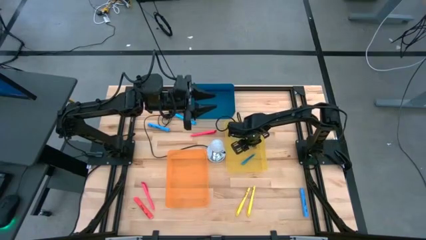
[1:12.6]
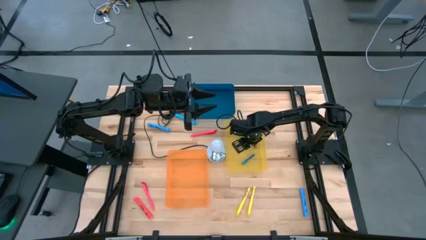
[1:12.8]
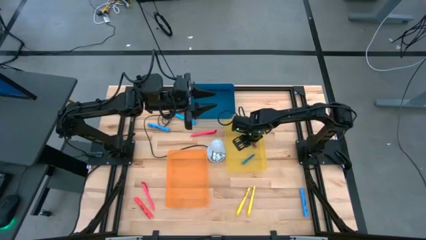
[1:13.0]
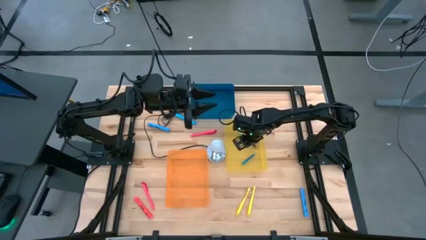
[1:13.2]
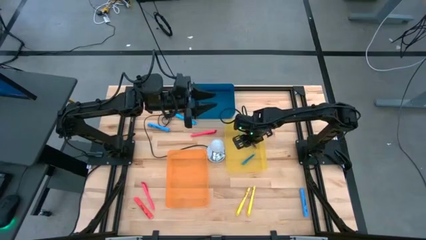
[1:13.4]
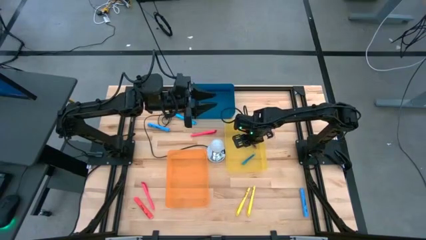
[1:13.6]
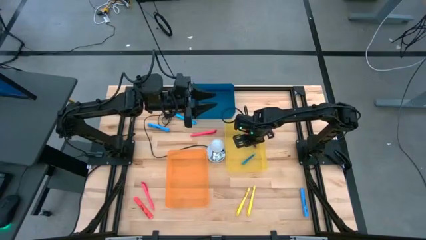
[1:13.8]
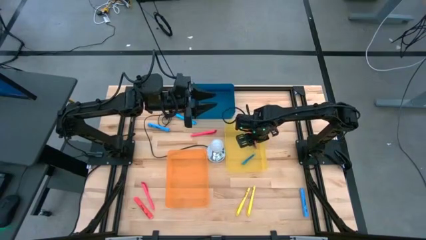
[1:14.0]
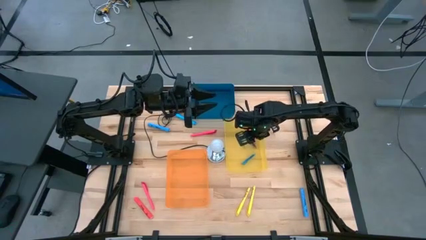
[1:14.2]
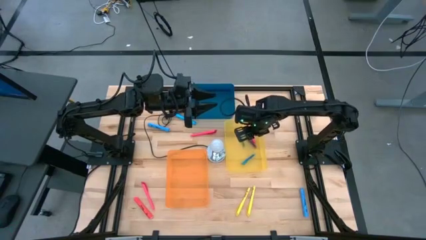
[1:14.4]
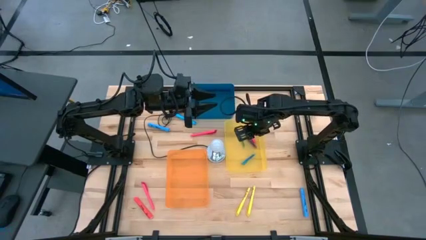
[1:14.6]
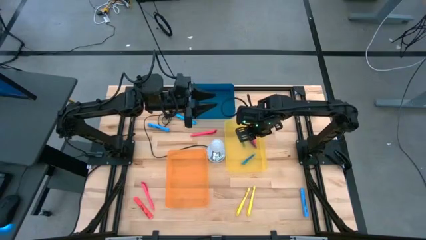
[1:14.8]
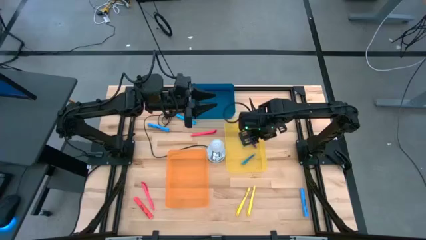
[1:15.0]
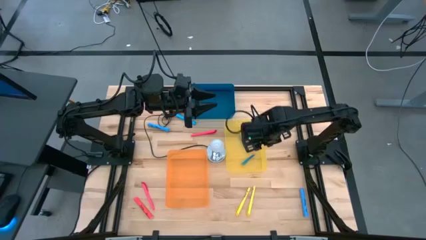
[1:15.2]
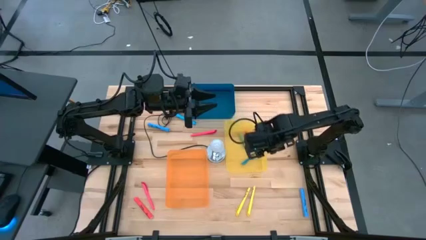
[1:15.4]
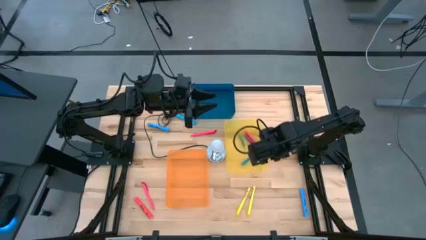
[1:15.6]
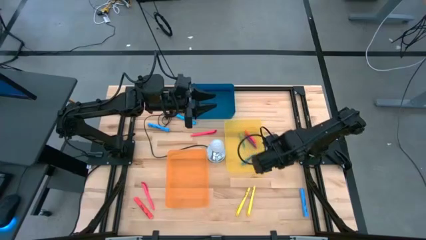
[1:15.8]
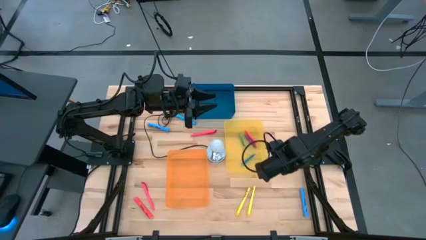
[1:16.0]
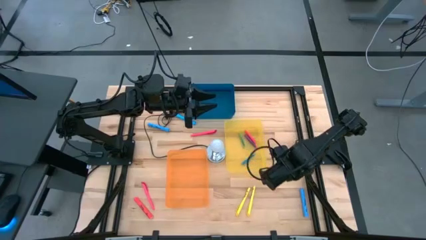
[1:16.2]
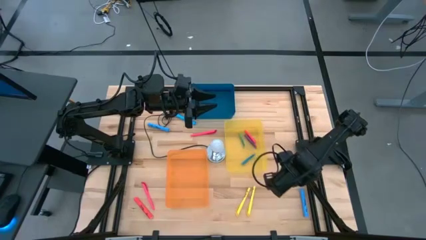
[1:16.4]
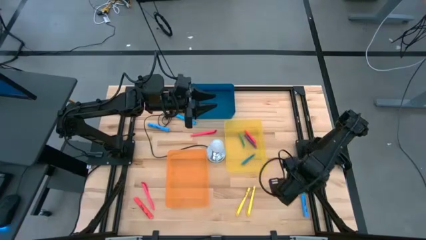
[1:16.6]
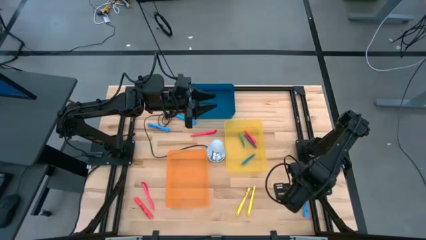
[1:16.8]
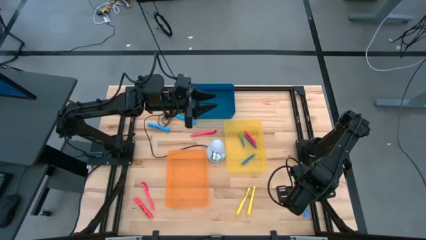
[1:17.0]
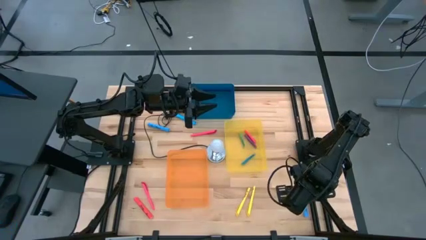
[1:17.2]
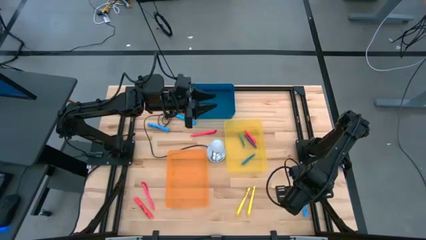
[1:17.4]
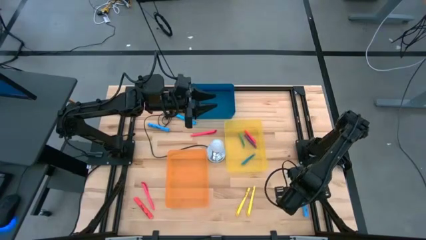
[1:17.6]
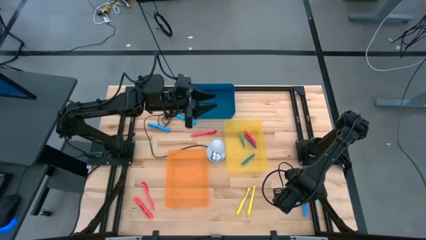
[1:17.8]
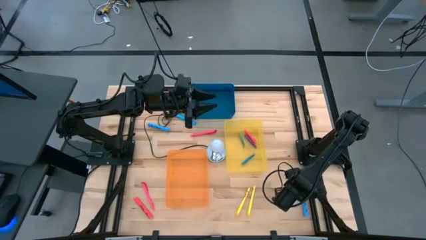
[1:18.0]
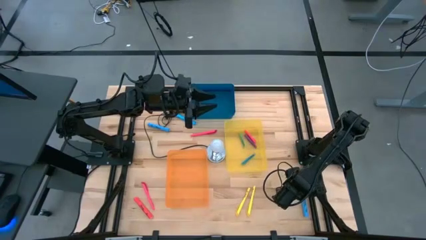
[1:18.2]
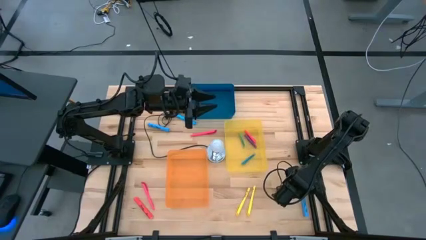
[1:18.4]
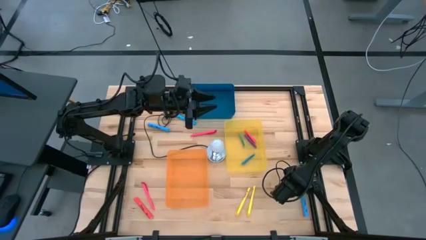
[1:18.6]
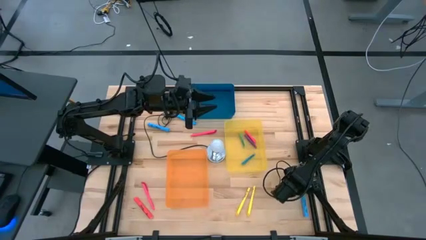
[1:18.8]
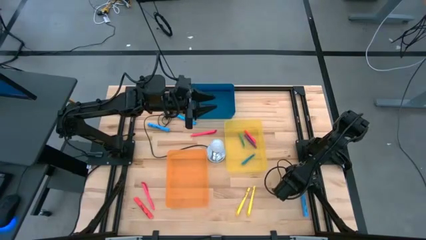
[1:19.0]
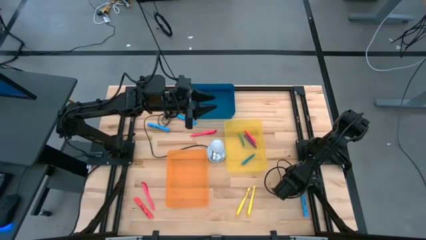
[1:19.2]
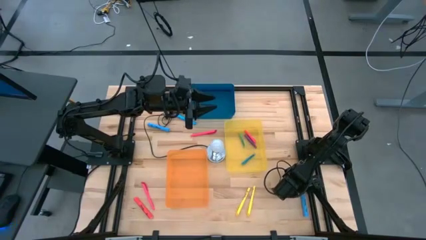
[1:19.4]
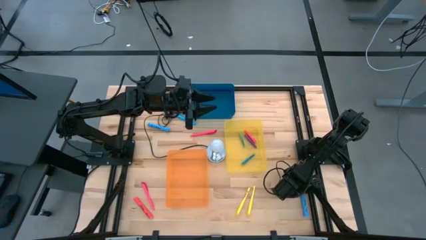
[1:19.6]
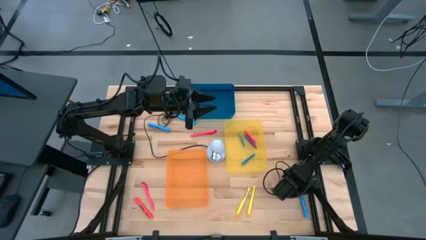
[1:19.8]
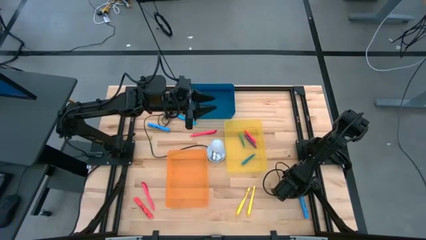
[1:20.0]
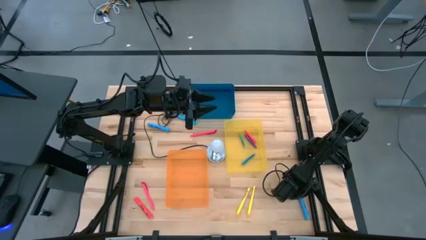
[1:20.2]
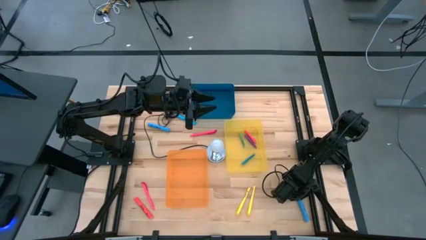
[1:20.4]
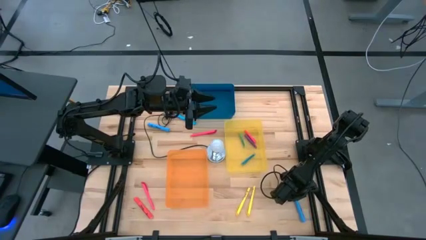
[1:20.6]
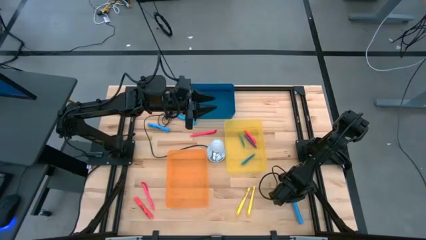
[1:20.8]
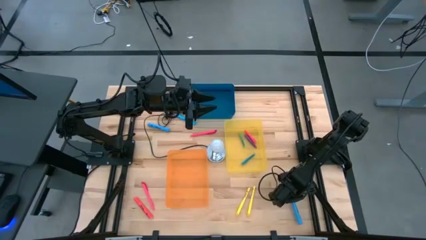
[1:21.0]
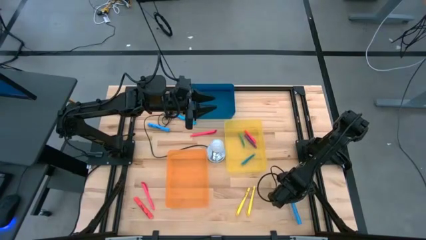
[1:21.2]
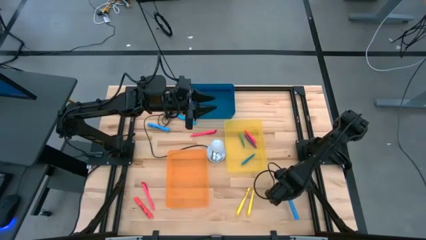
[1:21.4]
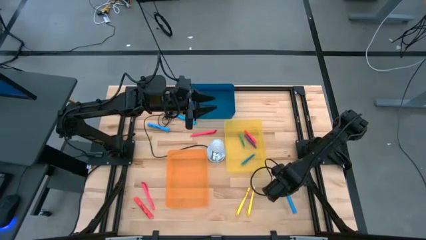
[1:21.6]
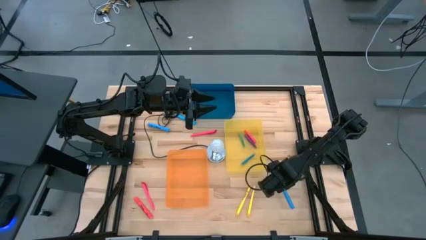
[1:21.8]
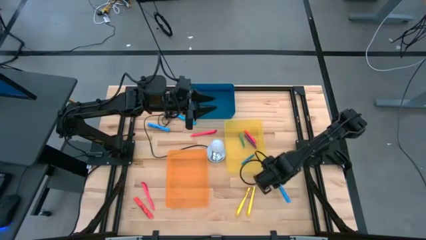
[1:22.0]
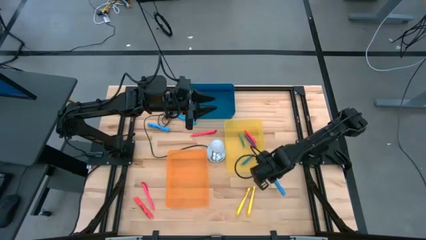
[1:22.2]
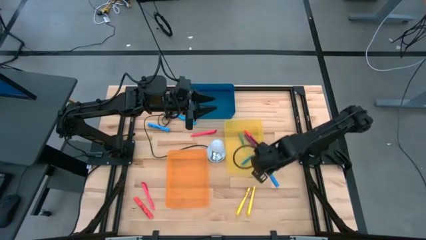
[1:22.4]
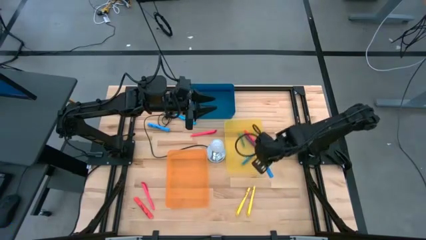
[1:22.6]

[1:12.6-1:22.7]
Task: Pick & Place Markers
Put the bottom blue highlighter pen into the orange bin
